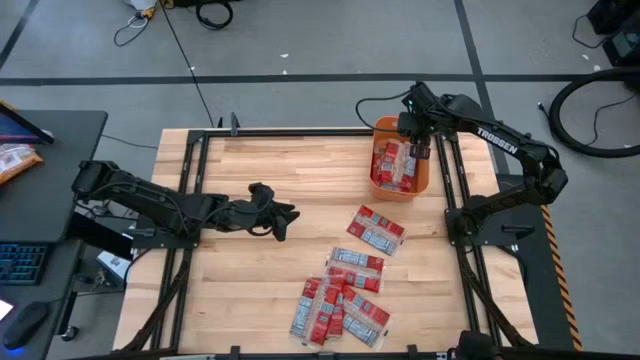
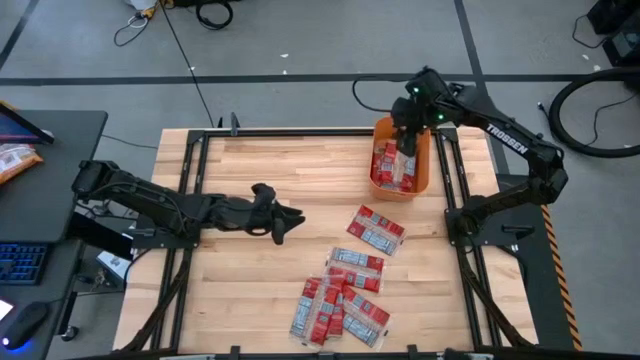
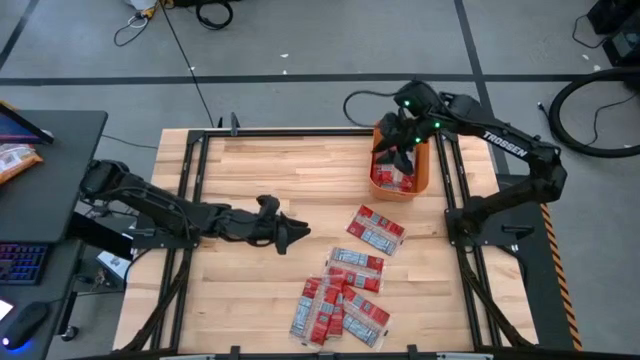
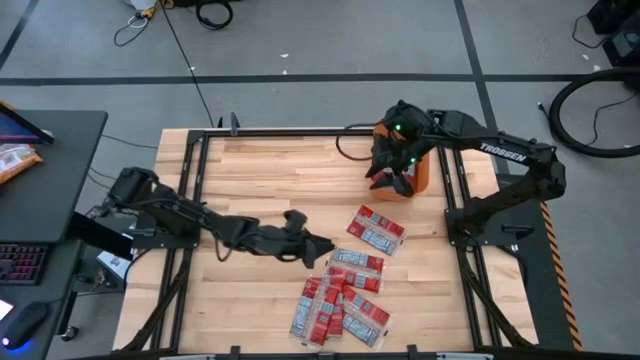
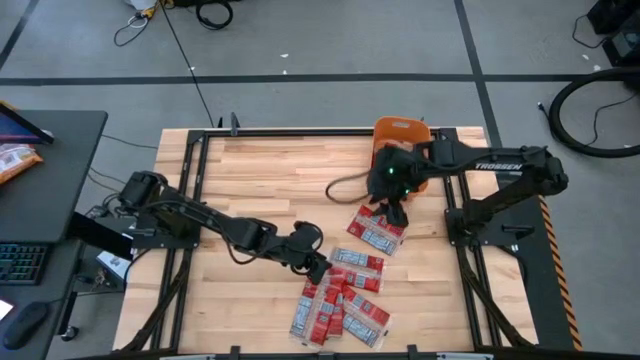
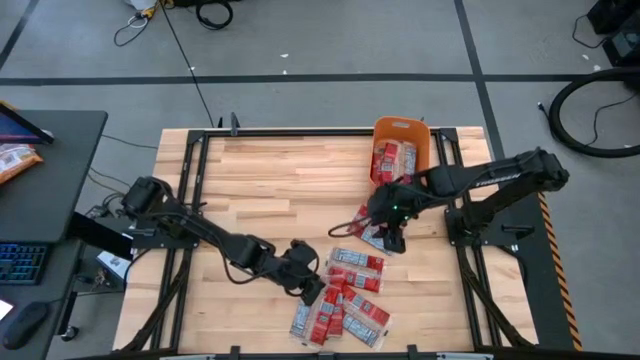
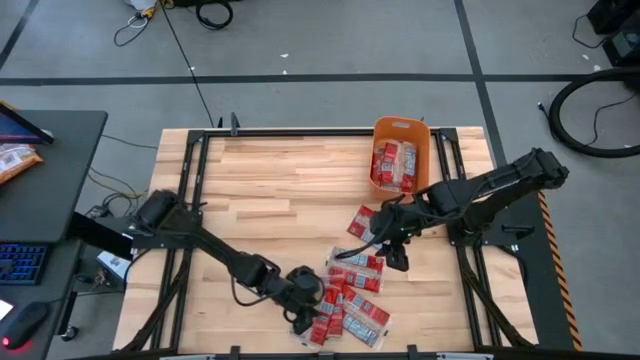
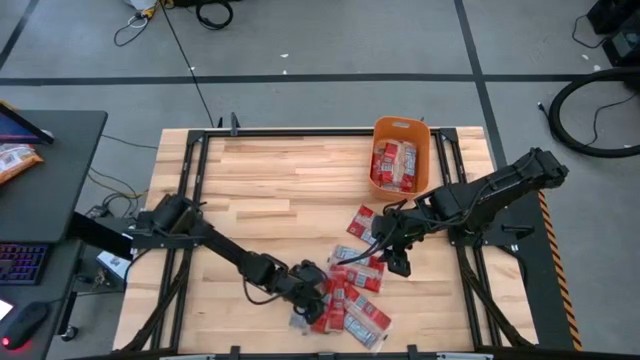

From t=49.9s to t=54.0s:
Task: Sort popcorn bags into baskets
Adjust the red popcorn bag on the table

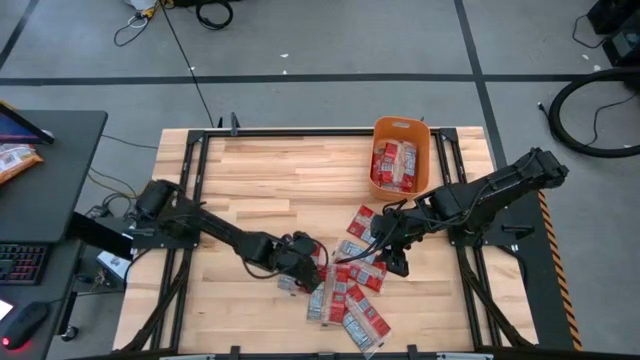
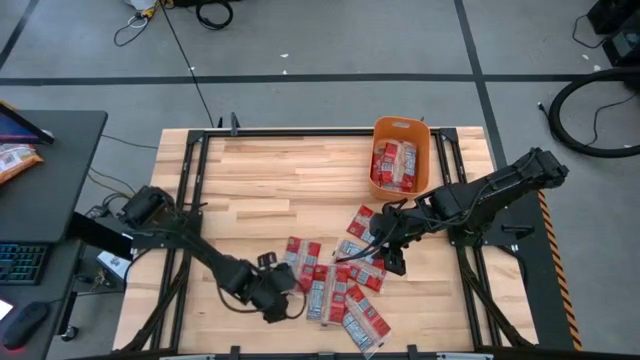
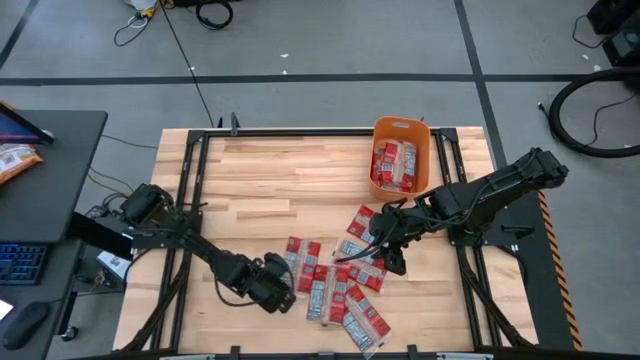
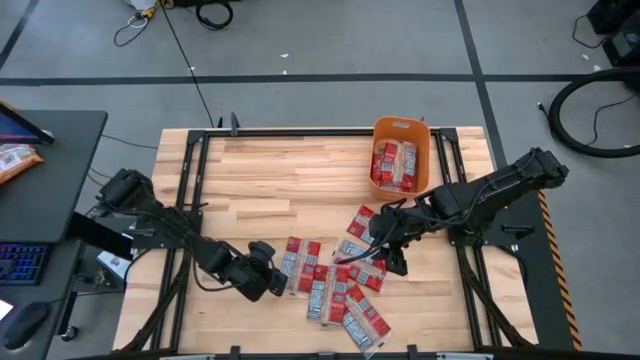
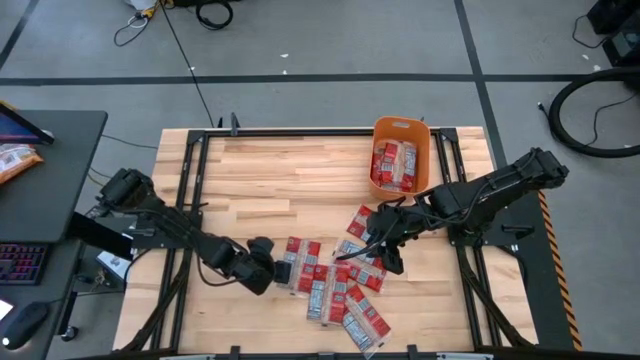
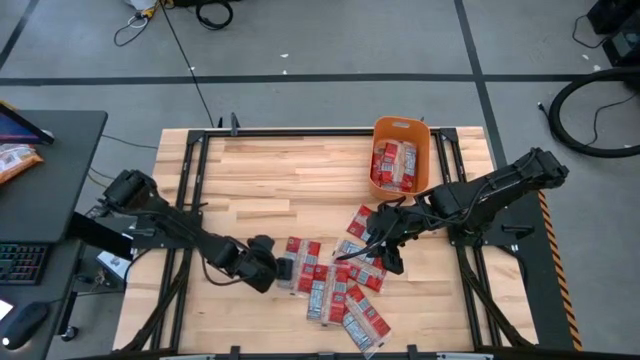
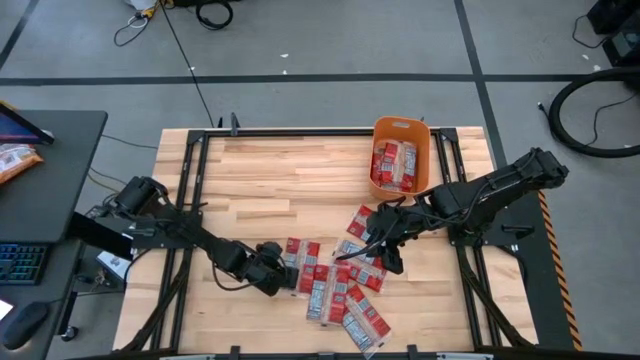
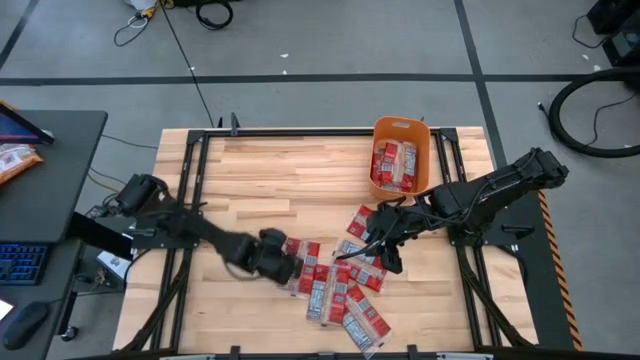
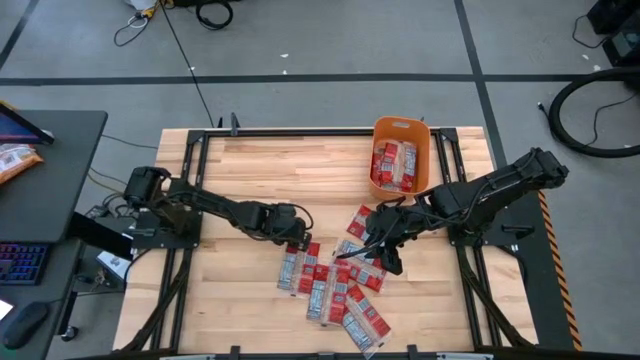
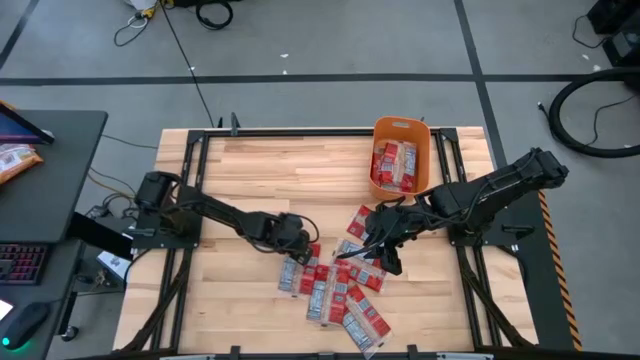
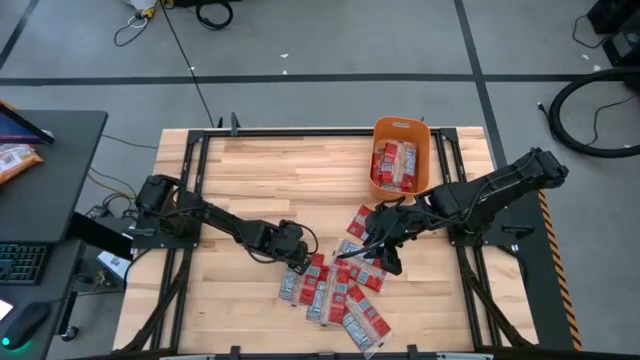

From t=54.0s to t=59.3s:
Put the red popcorn bag into the orange bin

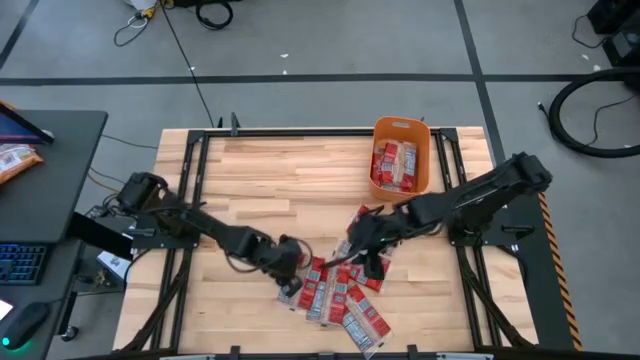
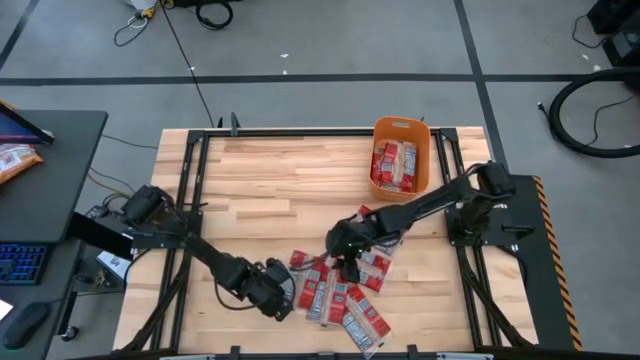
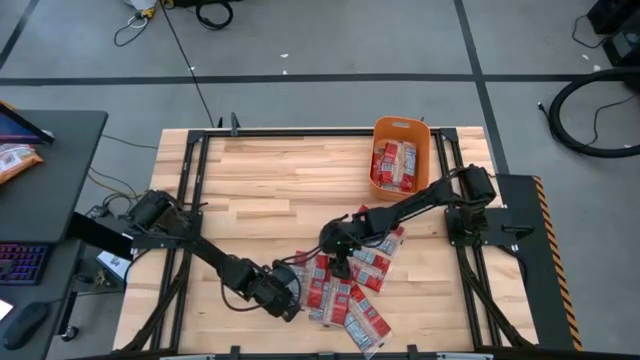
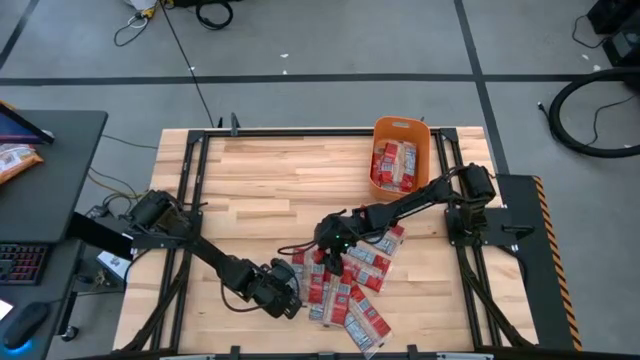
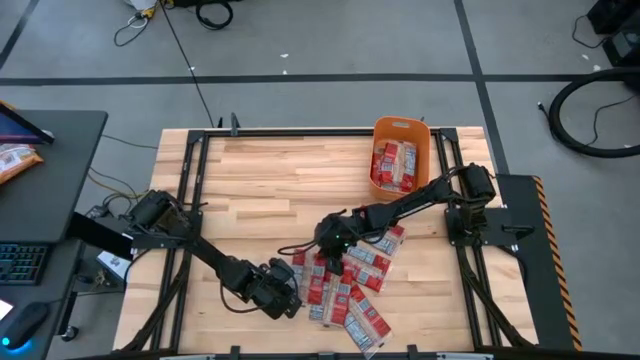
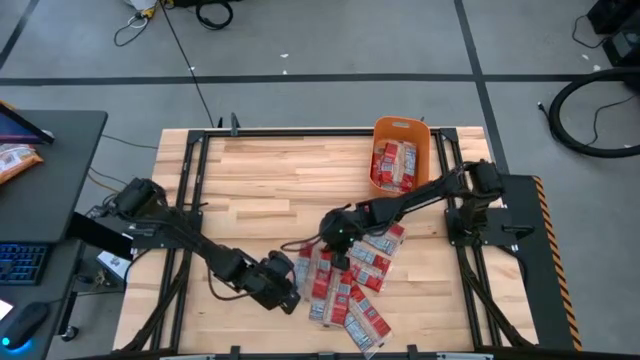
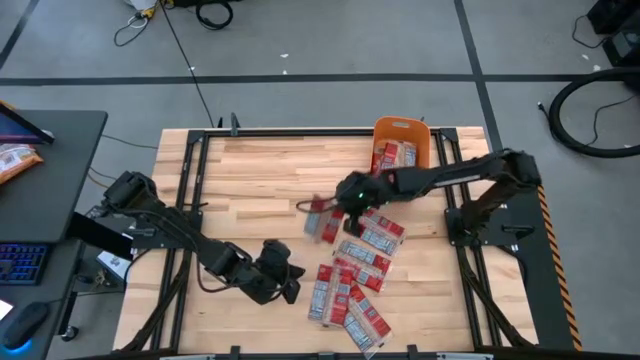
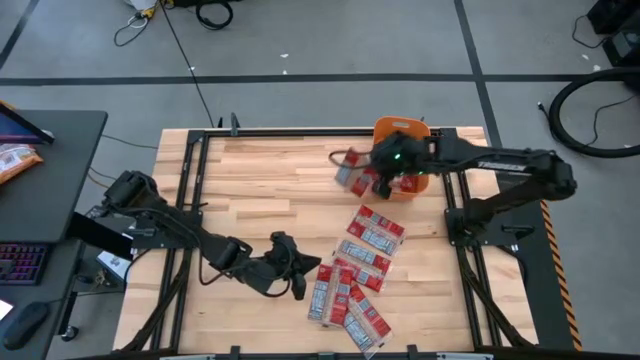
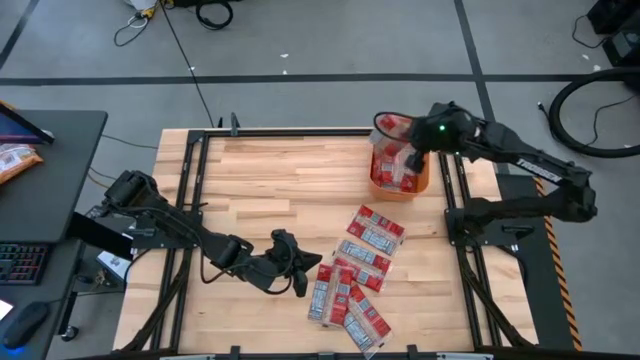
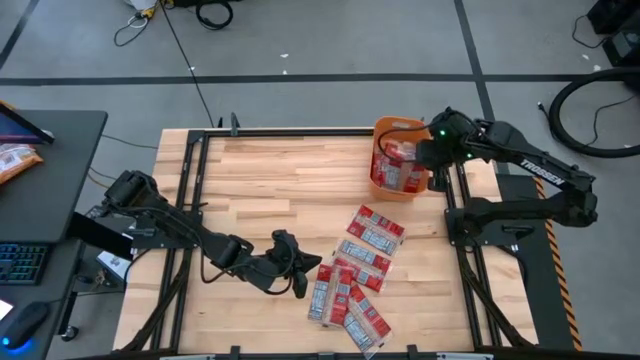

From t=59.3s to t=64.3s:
Put the red popcorn bag into the orange bin

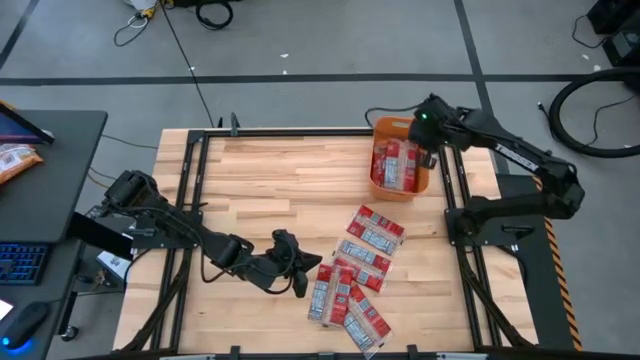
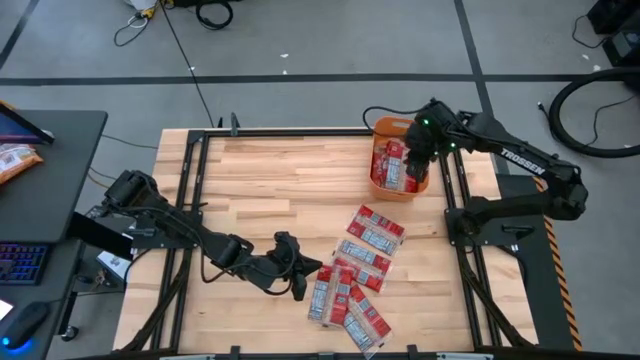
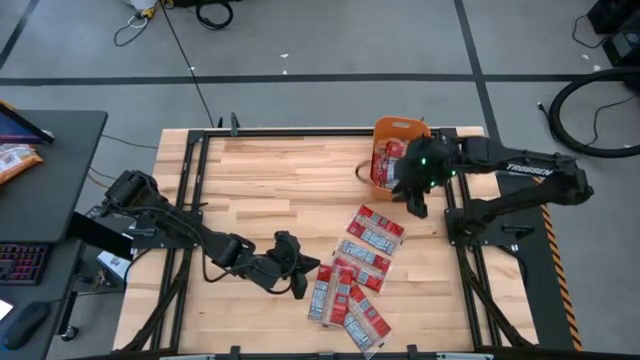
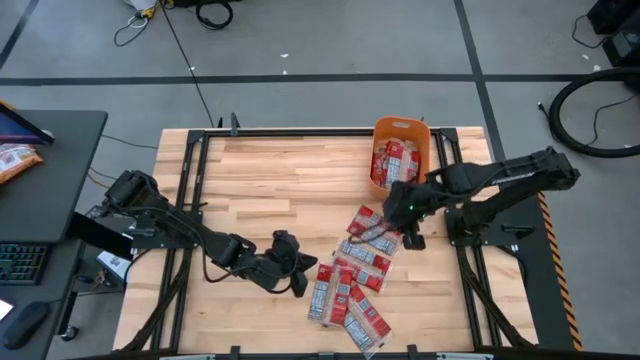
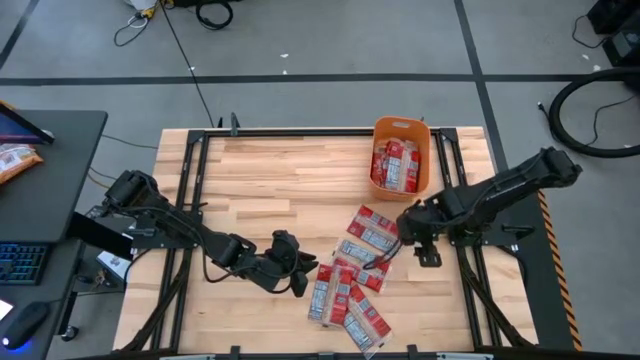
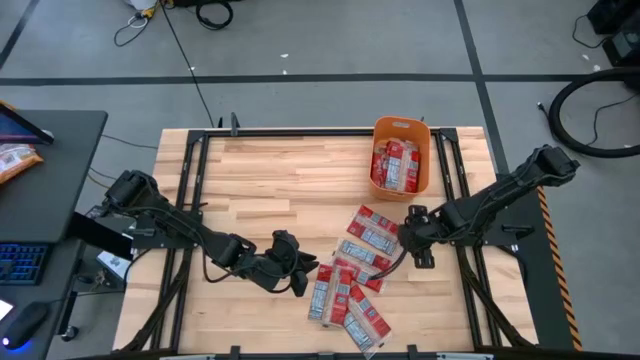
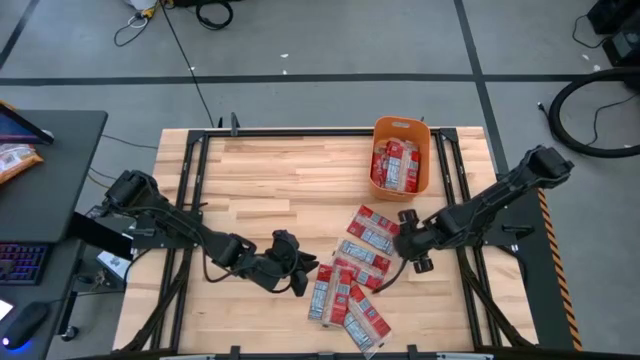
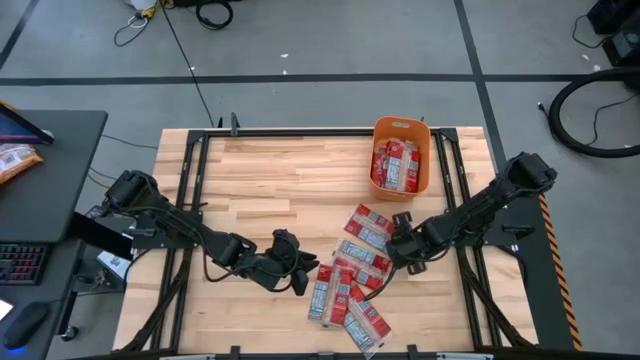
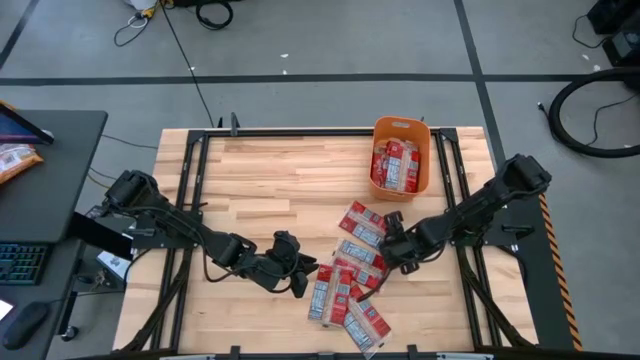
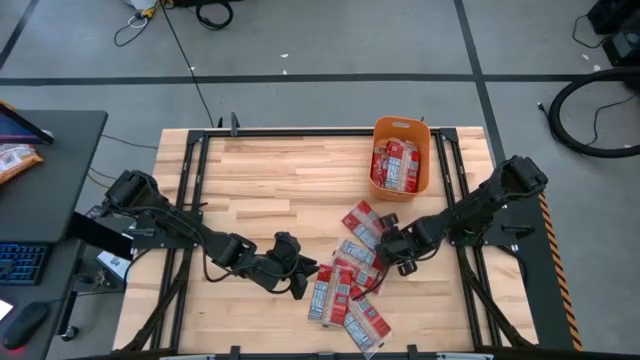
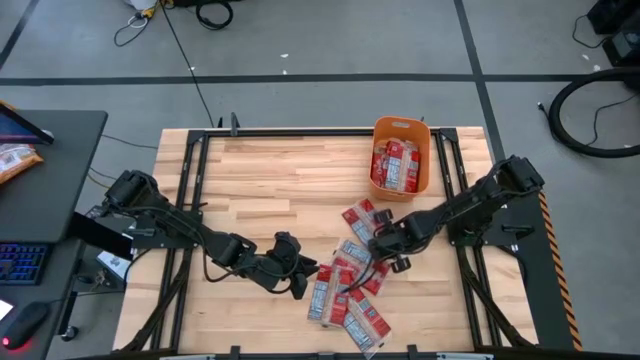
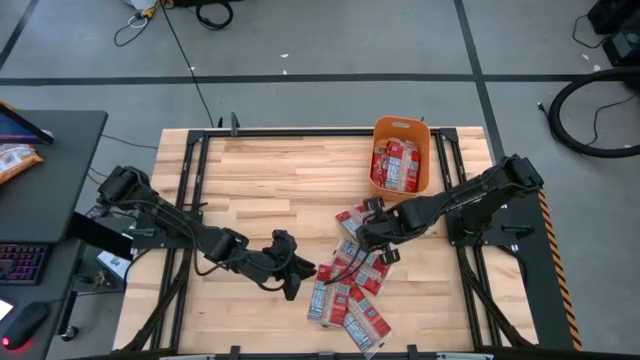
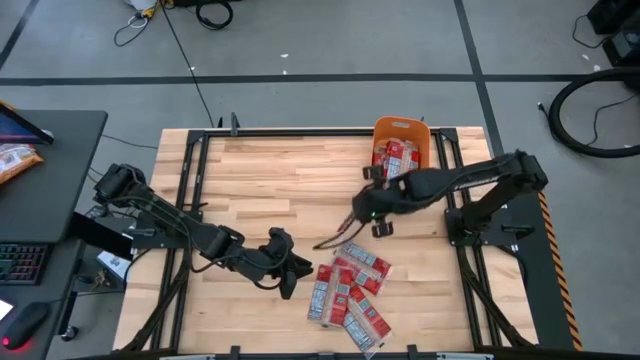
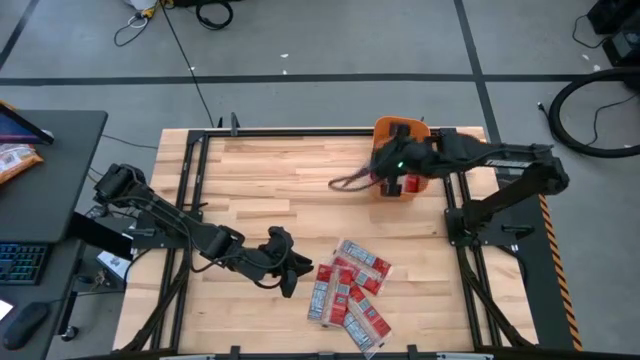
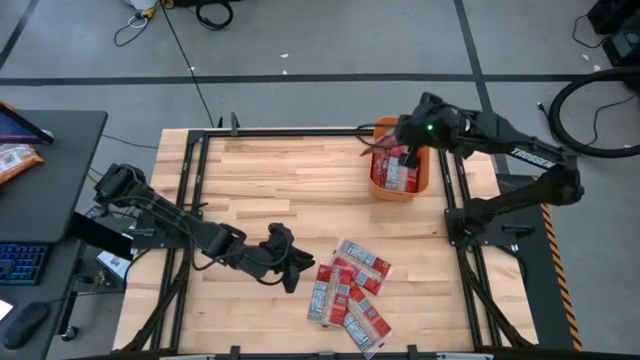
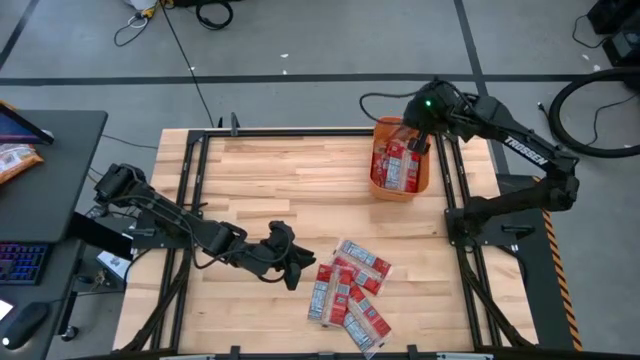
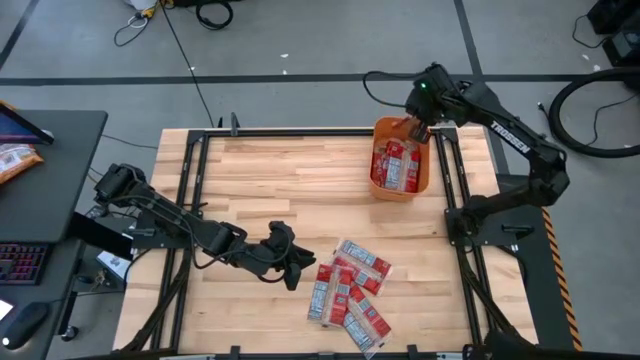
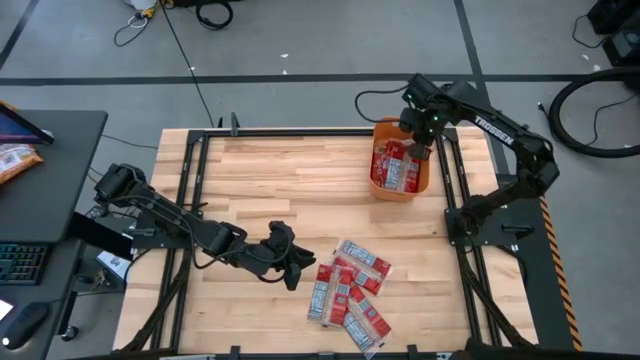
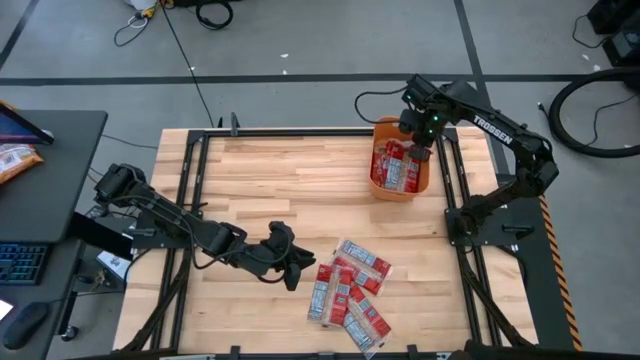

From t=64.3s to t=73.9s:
Put the red popcorn bag into the orange bin
